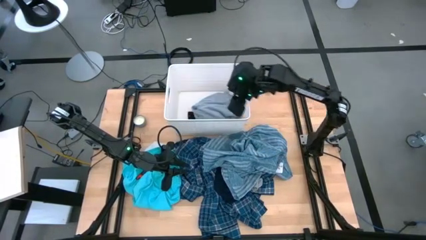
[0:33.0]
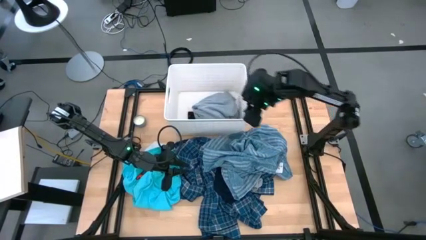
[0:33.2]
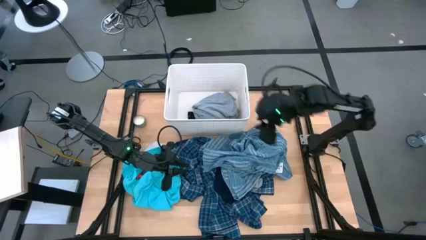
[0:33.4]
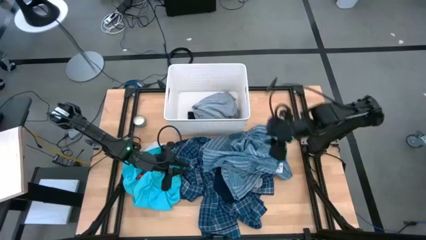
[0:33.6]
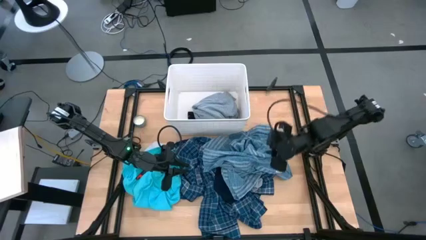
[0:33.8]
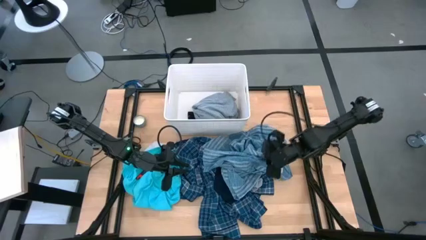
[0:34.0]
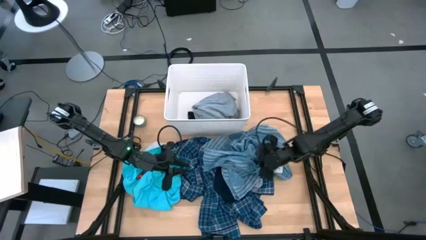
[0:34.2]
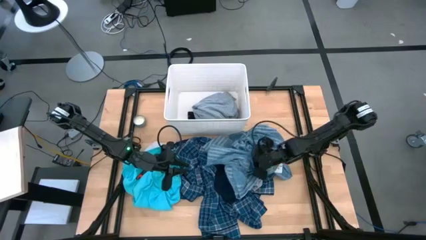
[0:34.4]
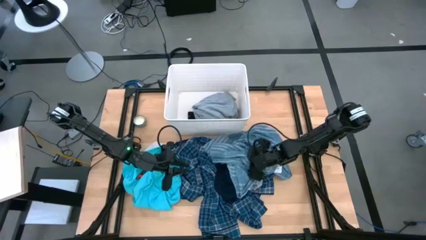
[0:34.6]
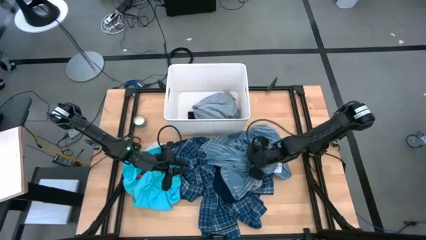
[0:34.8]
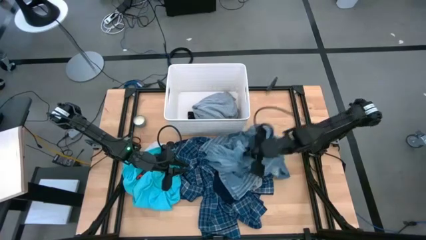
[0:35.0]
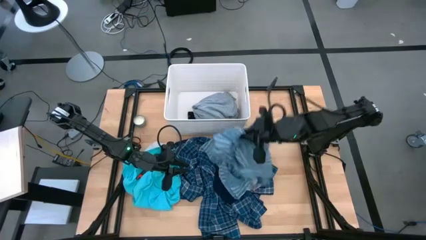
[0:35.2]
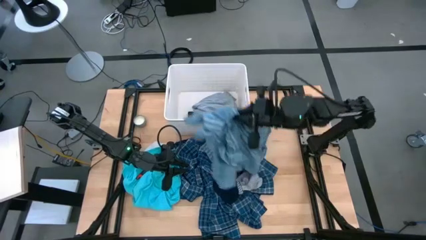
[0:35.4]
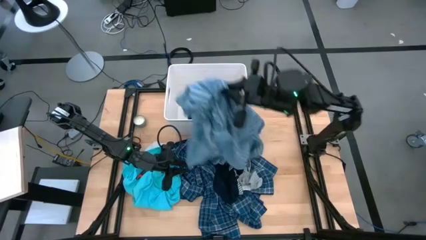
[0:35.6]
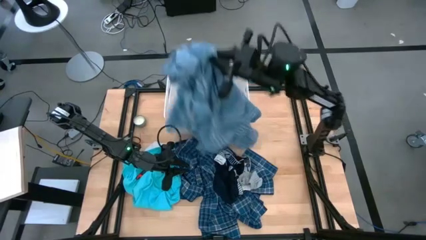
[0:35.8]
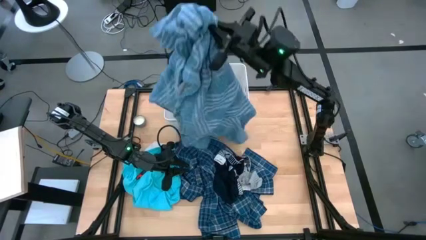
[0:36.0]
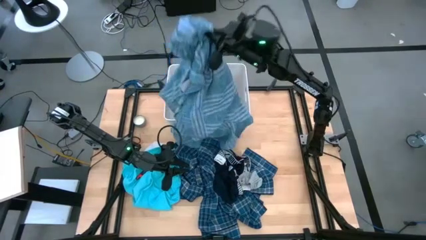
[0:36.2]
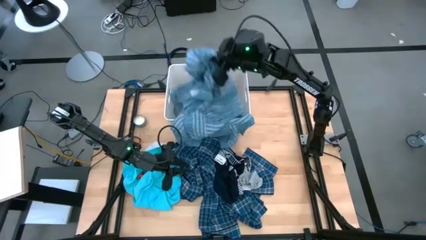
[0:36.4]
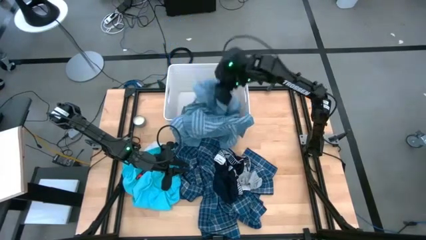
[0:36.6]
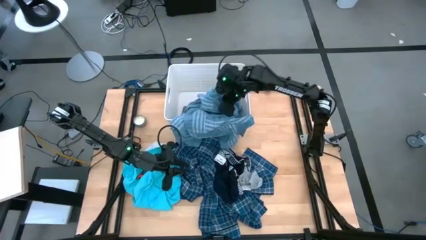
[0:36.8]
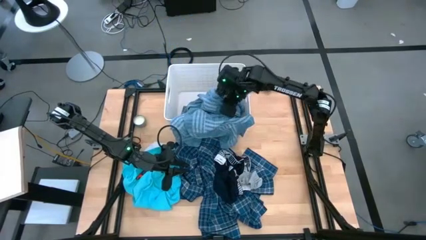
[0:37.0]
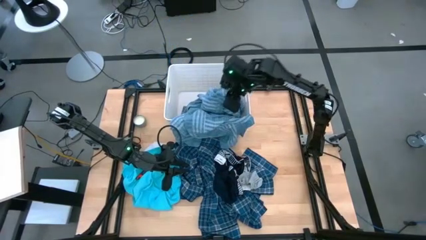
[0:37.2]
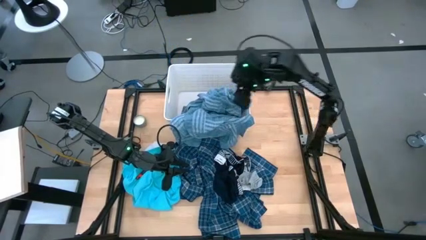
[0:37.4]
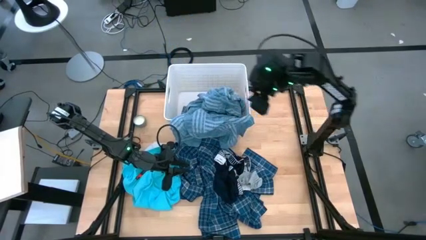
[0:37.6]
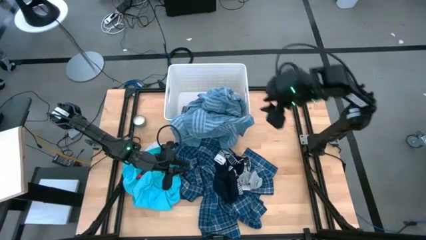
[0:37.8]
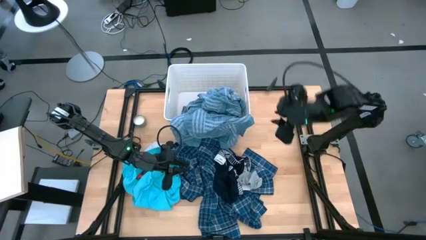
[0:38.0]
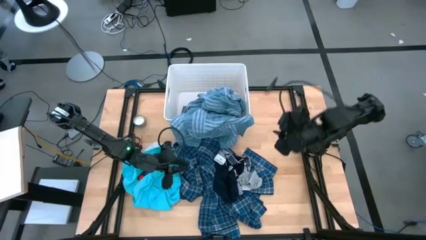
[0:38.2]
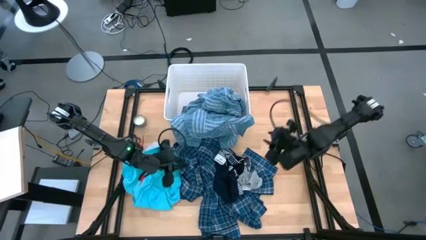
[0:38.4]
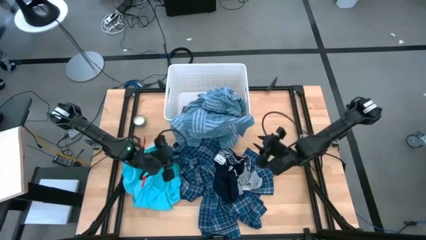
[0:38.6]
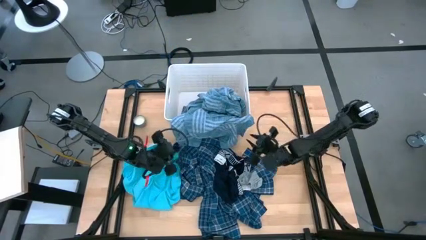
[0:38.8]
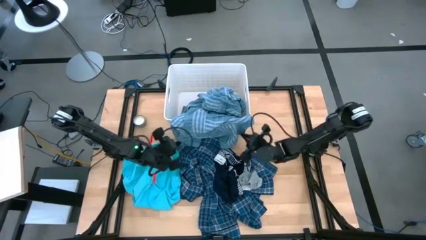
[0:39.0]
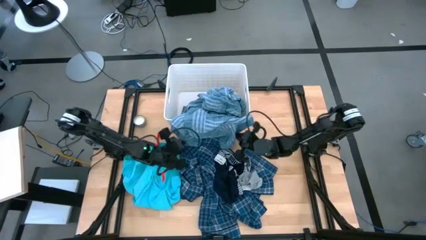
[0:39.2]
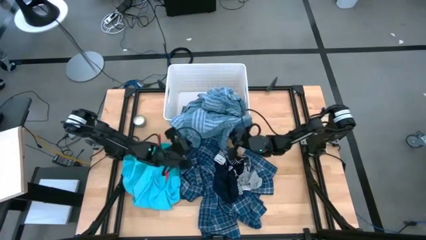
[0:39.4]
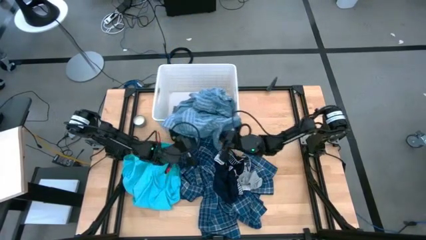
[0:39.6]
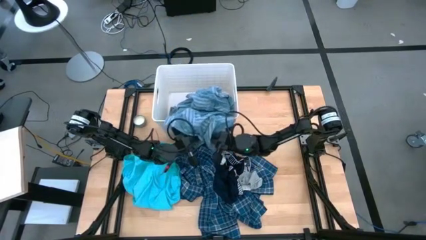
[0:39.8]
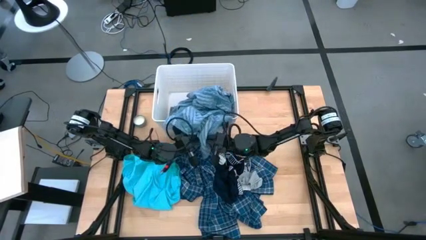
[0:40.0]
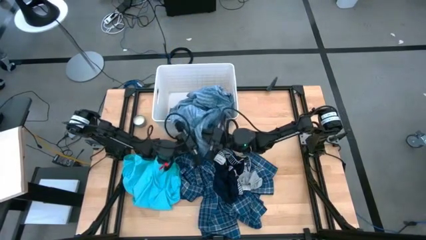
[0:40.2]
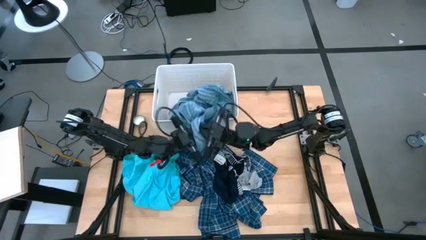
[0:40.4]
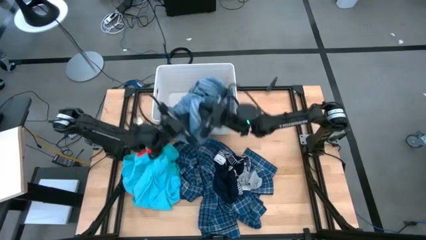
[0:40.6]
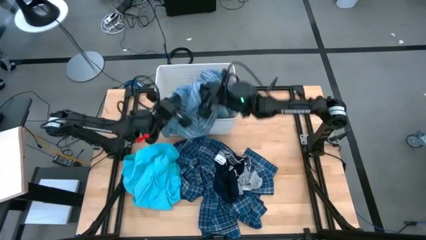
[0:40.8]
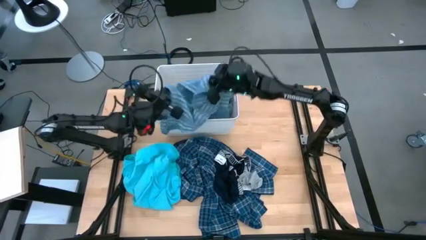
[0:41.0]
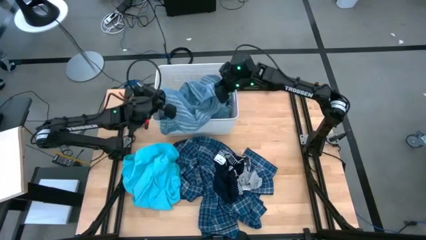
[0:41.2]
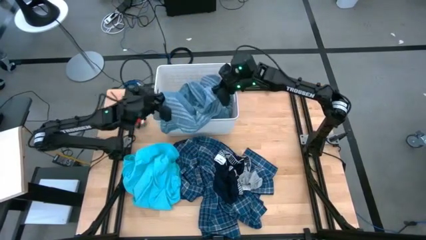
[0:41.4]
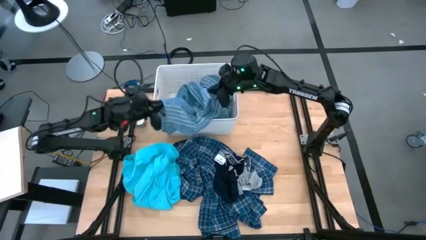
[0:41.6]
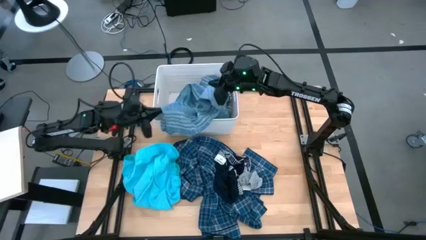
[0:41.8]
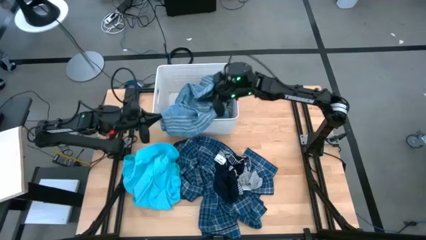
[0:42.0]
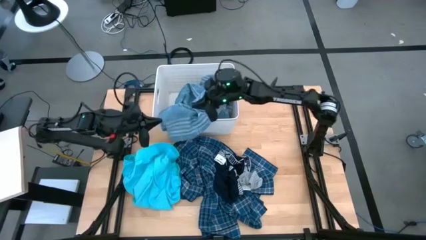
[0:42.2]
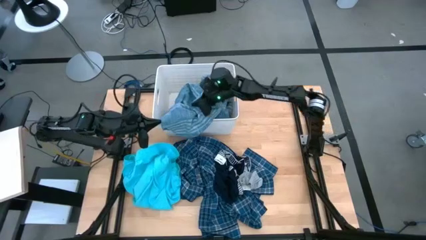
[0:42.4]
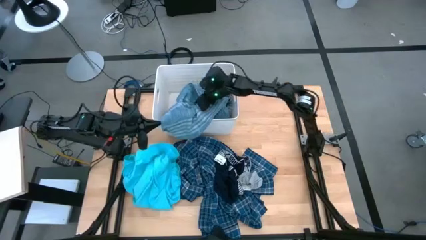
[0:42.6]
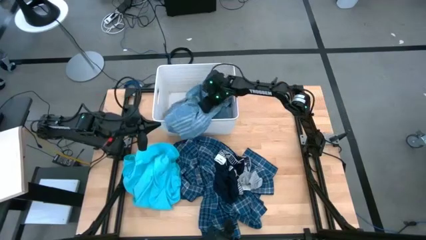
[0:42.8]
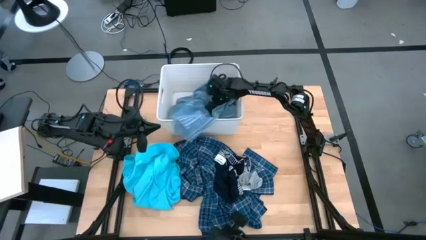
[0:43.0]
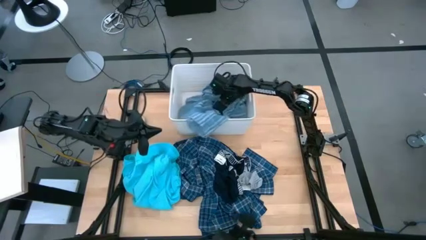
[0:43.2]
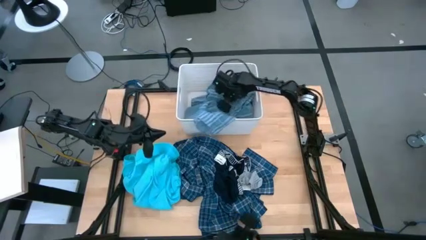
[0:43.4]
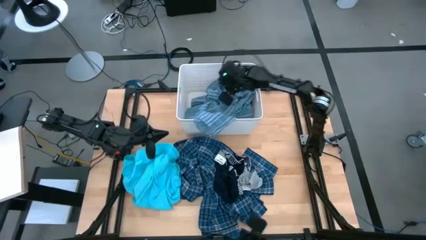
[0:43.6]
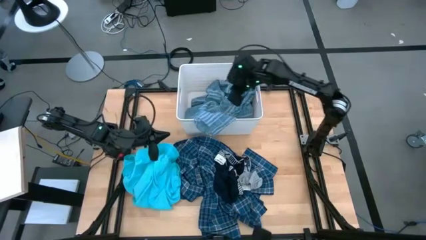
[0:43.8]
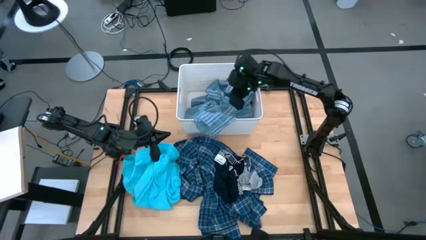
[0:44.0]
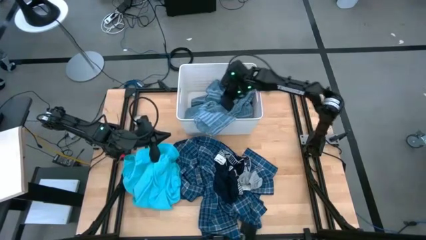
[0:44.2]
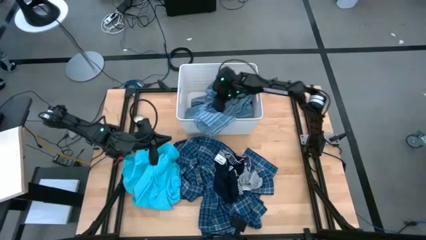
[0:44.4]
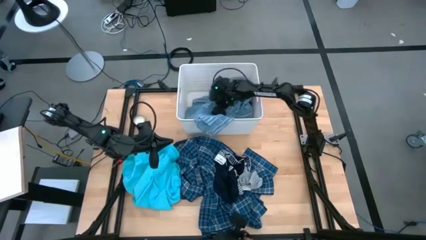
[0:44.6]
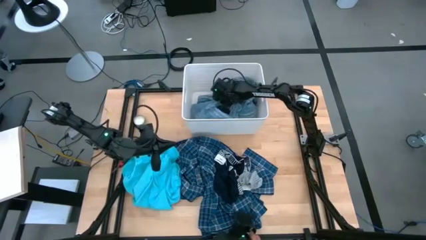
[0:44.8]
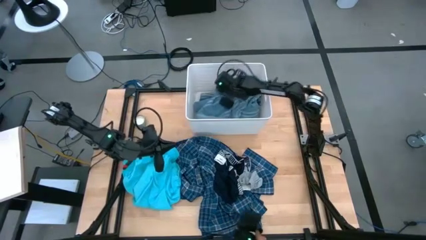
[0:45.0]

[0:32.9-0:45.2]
Task: Sort clothes
Put the light blue shirt into the white bin

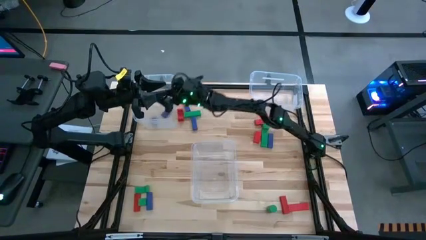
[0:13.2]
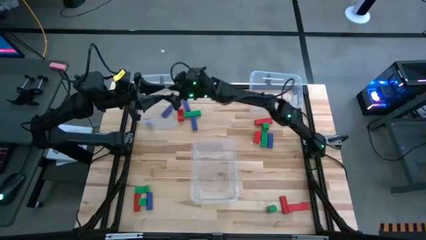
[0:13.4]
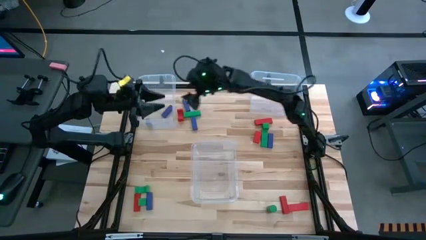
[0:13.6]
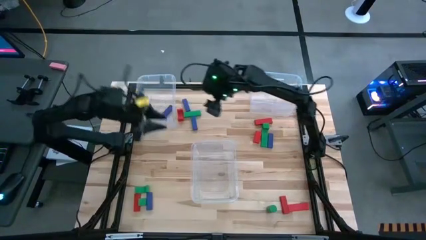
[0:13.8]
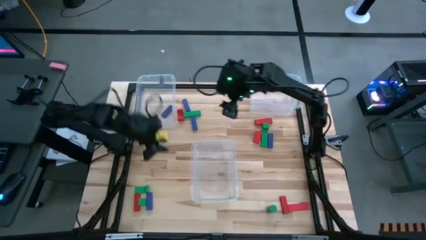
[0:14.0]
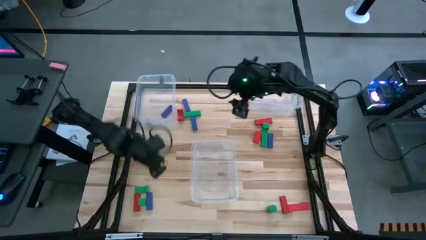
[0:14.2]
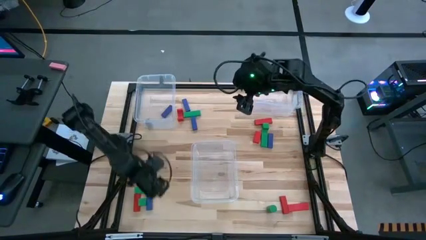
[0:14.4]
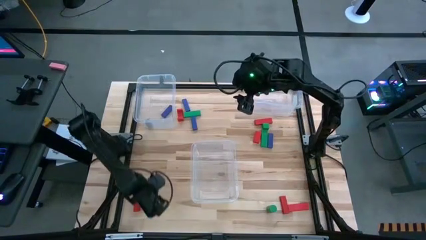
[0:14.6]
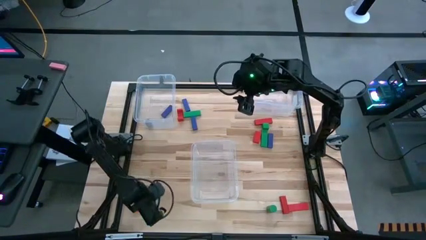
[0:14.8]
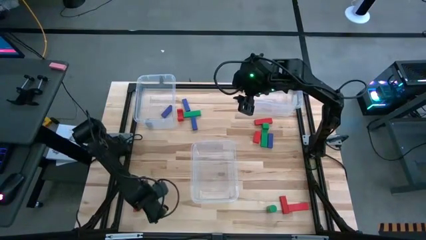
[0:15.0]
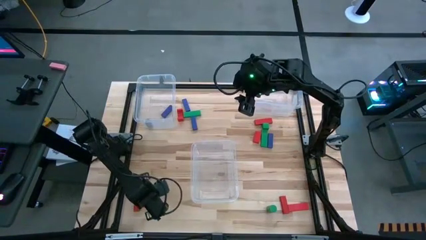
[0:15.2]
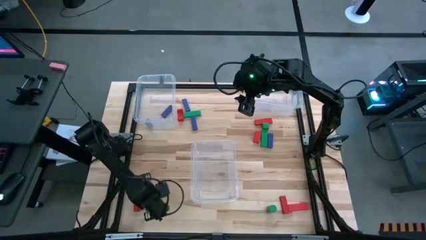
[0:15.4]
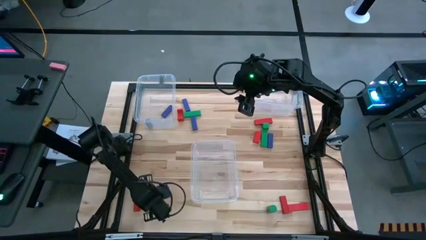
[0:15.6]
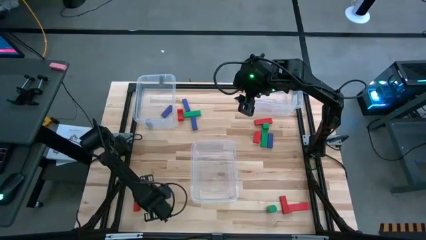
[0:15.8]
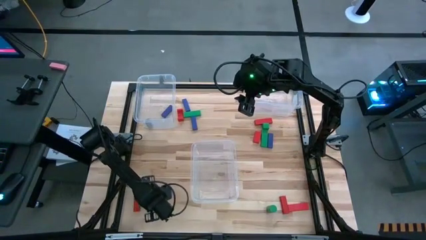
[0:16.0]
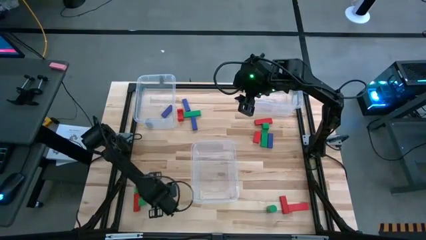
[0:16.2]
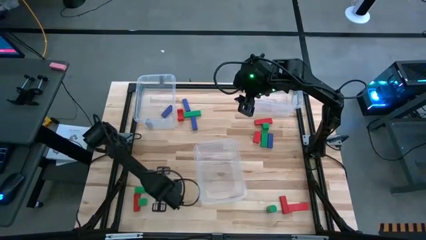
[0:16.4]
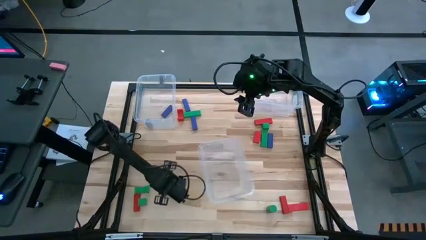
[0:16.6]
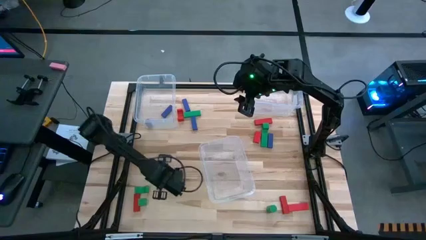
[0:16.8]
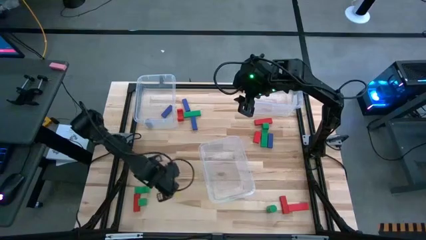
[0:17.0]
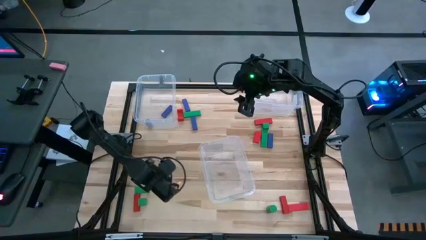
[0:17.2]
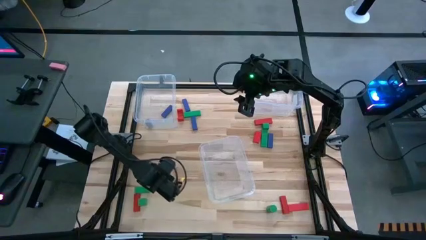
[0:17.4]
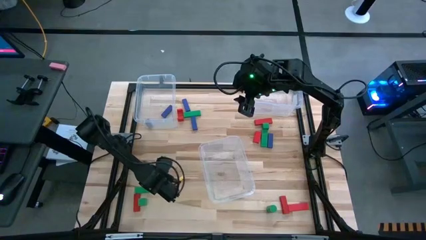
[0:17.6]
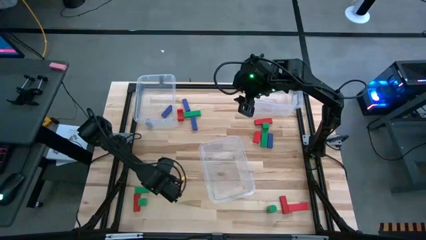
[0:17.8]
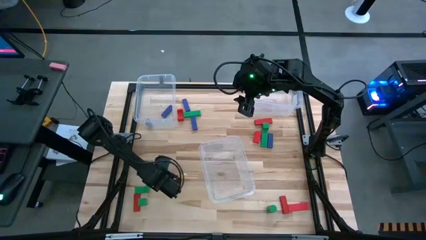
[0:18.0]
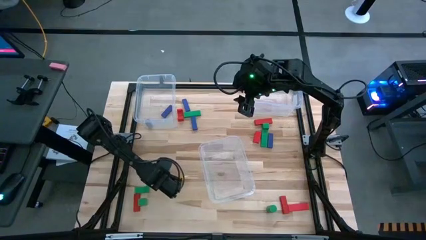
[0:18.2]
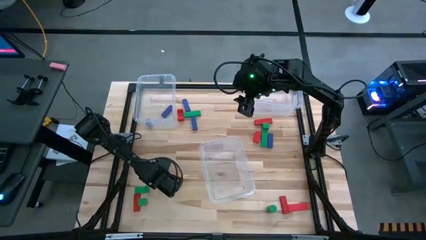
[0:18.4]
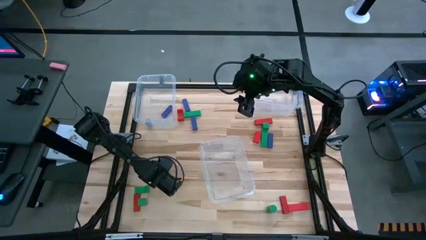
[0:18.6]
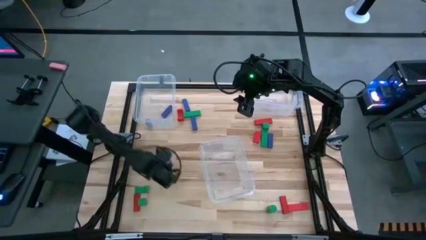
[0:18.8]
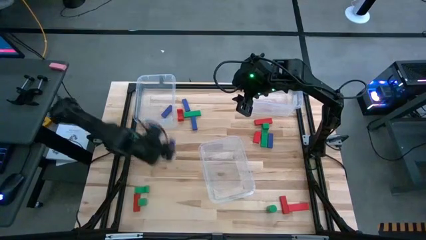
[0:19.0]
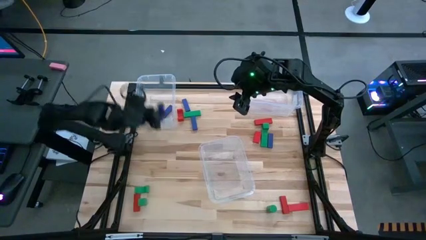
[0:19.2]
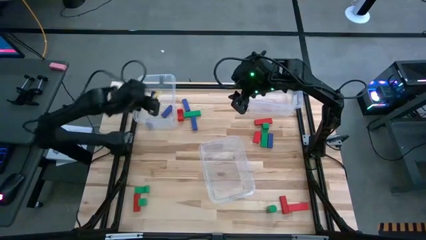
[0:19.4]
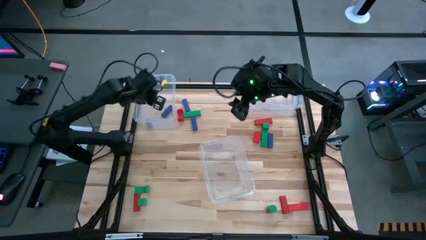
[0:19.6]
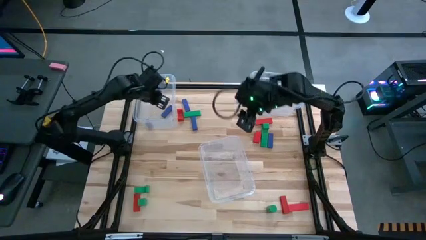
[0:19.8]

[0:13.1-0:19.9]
Task: Sort blocks
Put the blue block into the top left transparent bin
